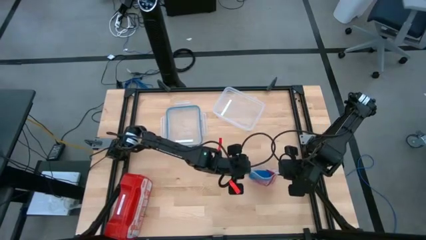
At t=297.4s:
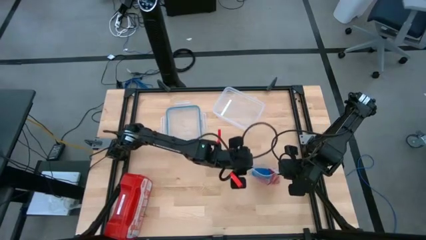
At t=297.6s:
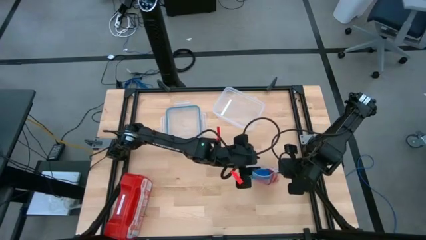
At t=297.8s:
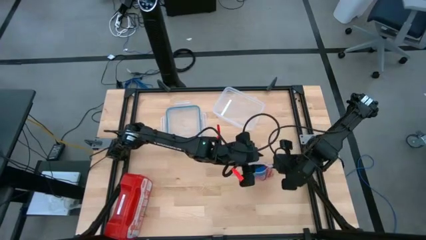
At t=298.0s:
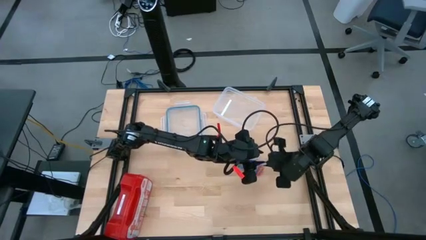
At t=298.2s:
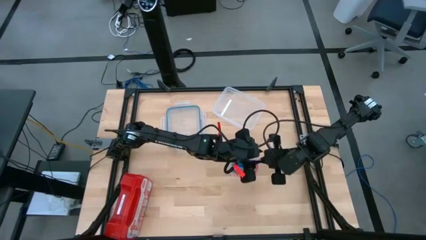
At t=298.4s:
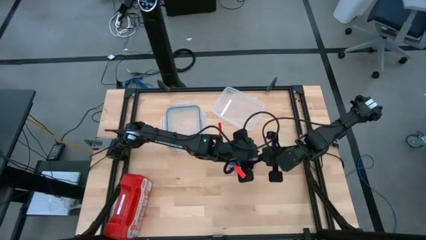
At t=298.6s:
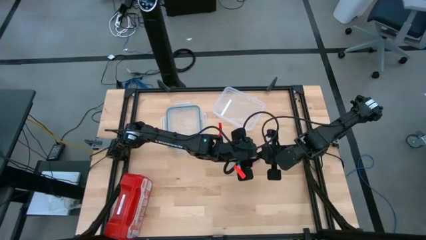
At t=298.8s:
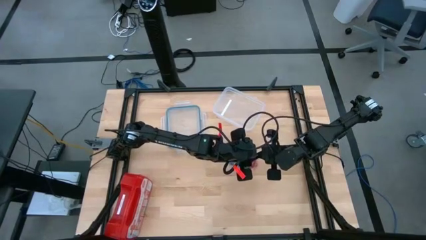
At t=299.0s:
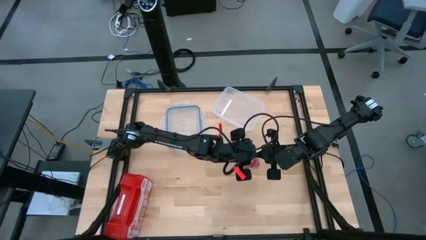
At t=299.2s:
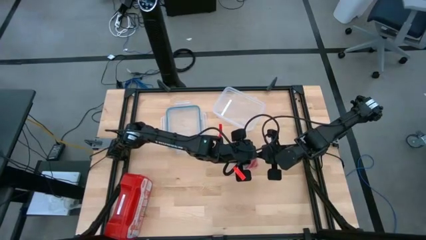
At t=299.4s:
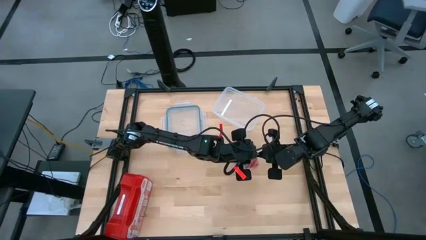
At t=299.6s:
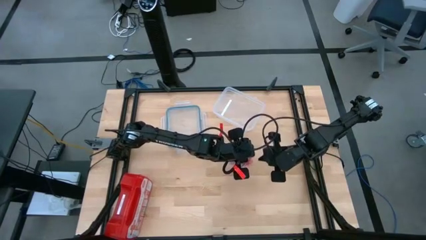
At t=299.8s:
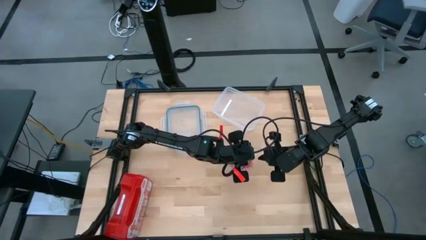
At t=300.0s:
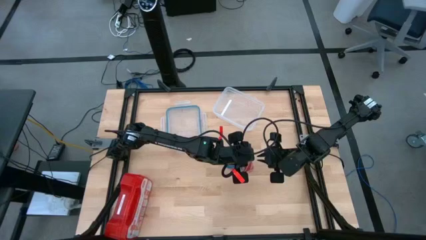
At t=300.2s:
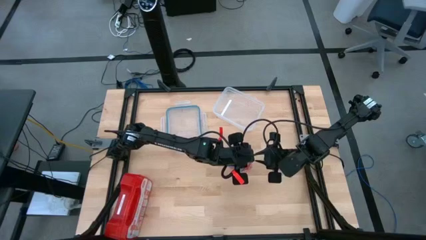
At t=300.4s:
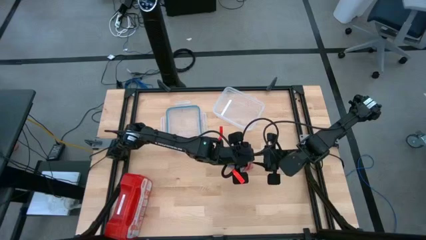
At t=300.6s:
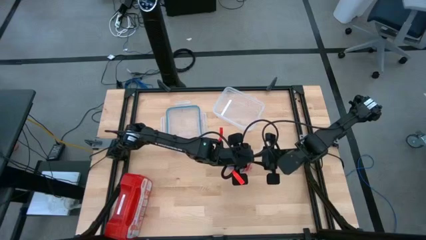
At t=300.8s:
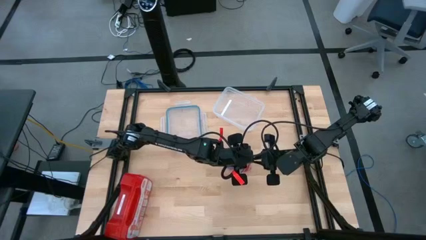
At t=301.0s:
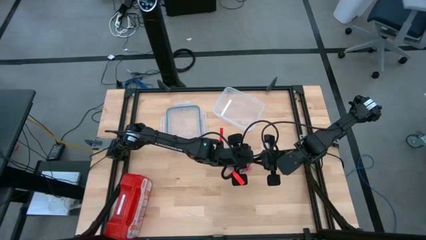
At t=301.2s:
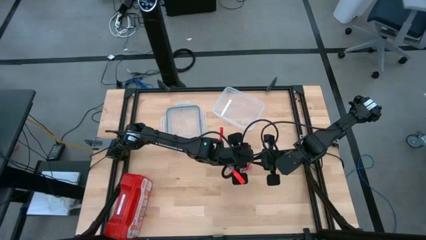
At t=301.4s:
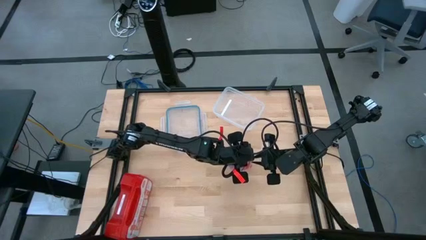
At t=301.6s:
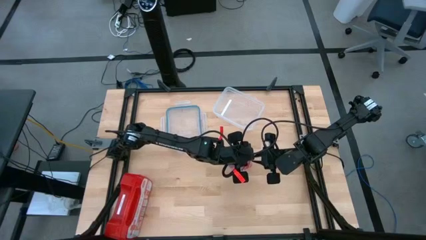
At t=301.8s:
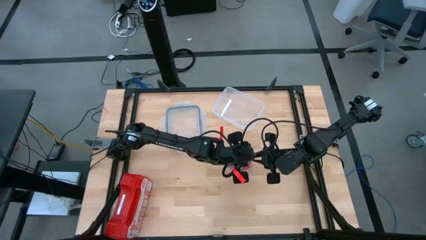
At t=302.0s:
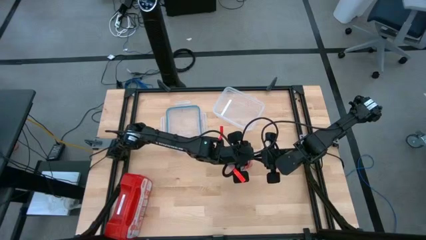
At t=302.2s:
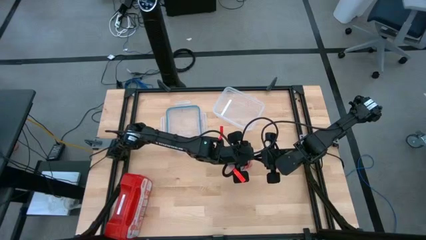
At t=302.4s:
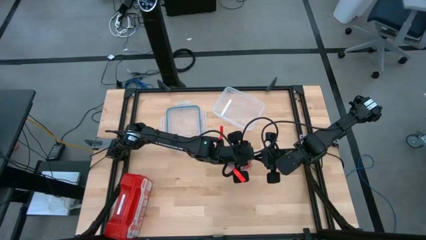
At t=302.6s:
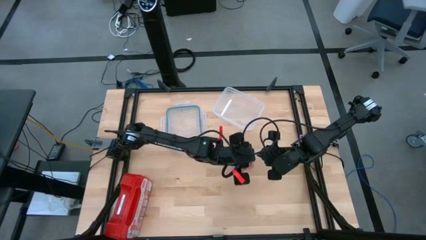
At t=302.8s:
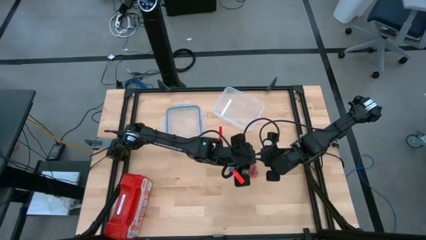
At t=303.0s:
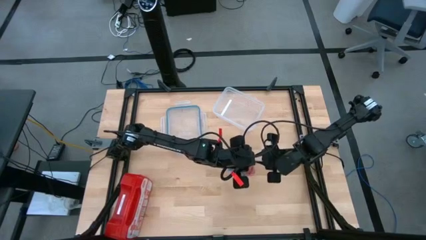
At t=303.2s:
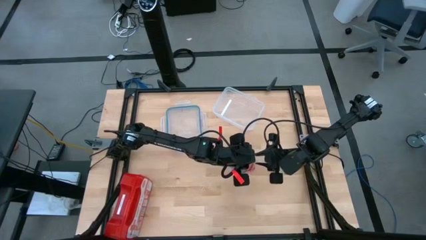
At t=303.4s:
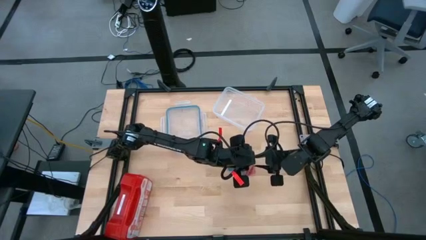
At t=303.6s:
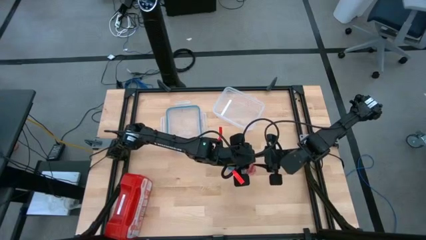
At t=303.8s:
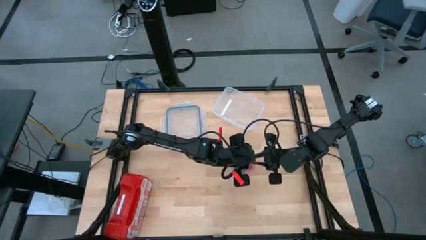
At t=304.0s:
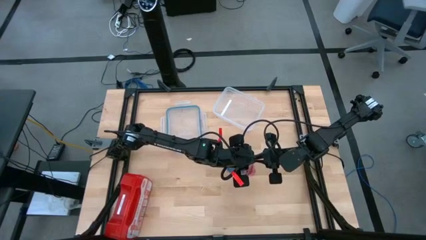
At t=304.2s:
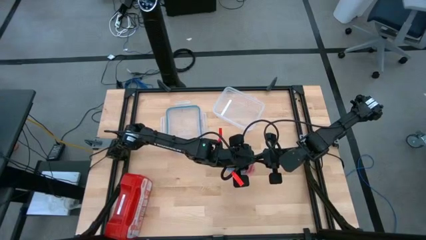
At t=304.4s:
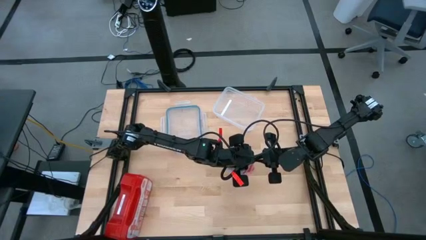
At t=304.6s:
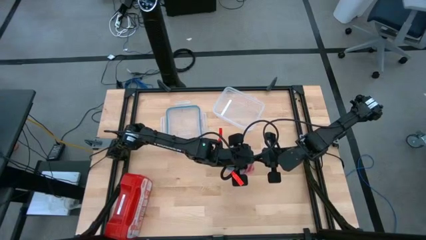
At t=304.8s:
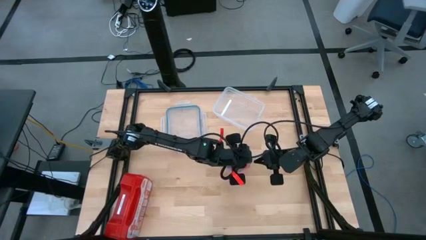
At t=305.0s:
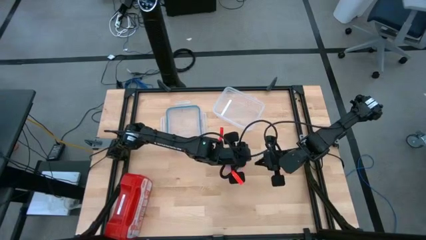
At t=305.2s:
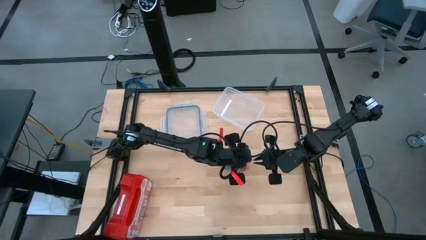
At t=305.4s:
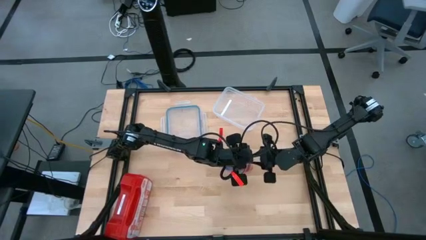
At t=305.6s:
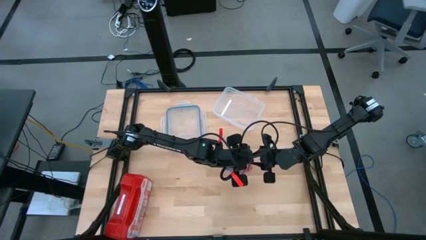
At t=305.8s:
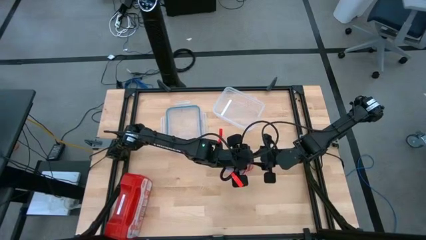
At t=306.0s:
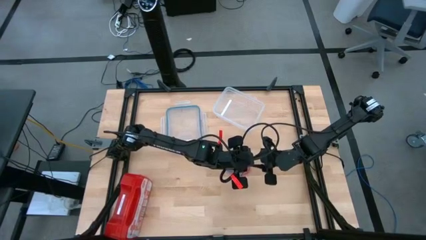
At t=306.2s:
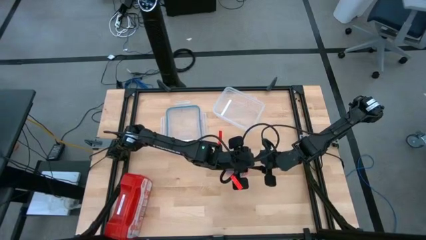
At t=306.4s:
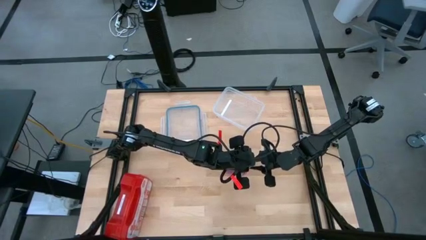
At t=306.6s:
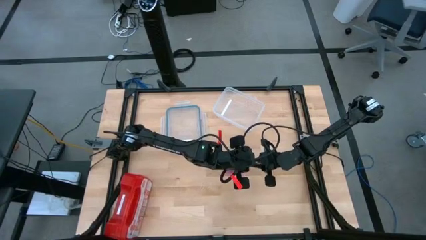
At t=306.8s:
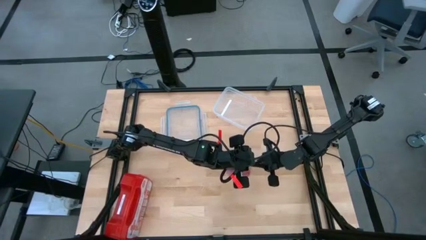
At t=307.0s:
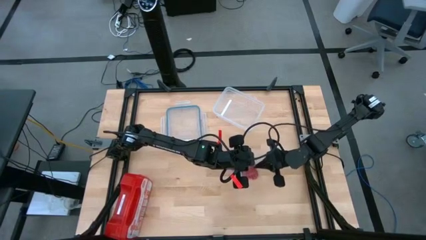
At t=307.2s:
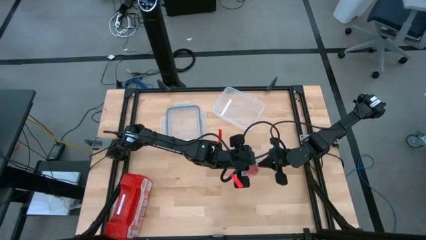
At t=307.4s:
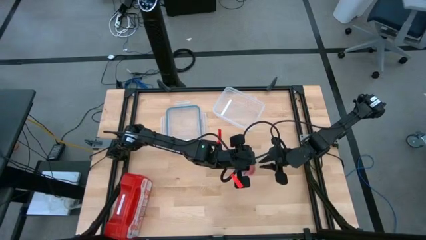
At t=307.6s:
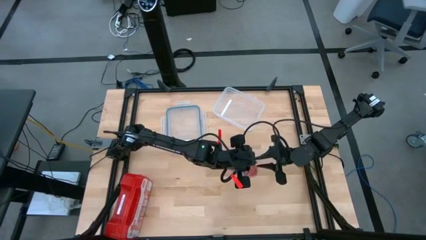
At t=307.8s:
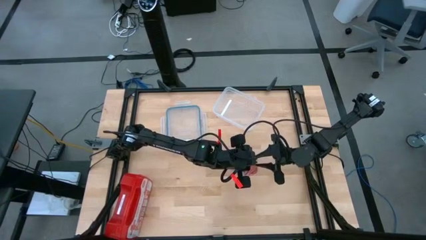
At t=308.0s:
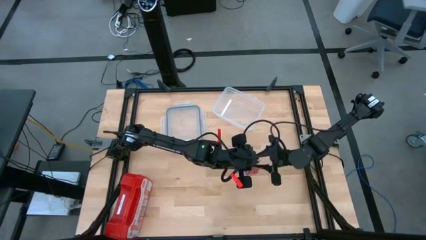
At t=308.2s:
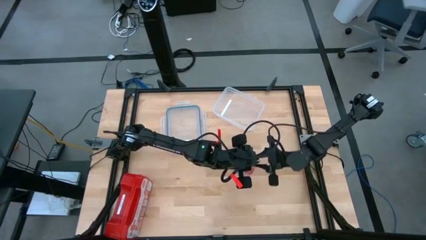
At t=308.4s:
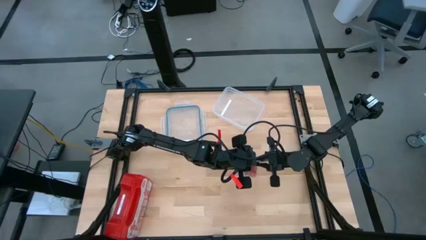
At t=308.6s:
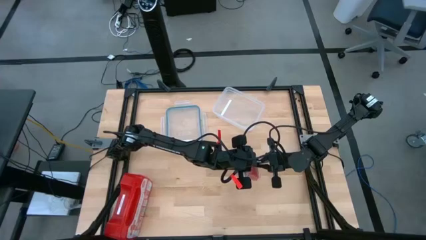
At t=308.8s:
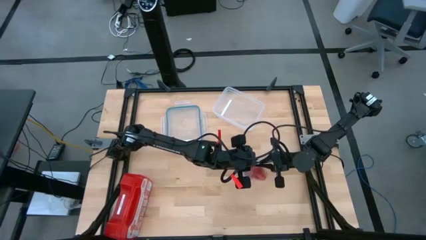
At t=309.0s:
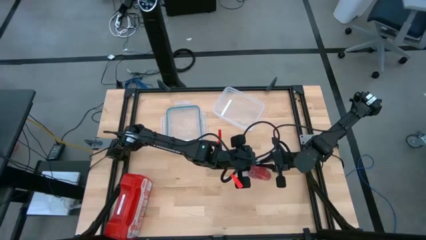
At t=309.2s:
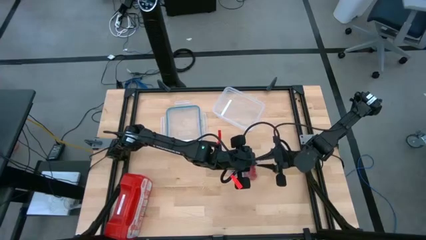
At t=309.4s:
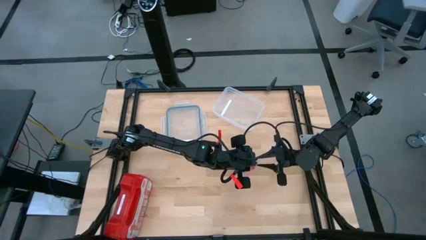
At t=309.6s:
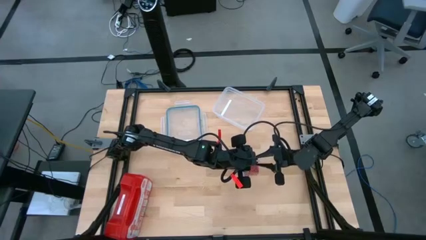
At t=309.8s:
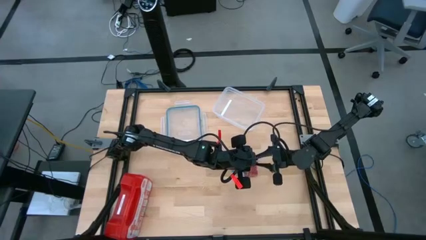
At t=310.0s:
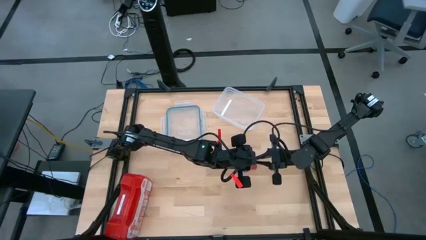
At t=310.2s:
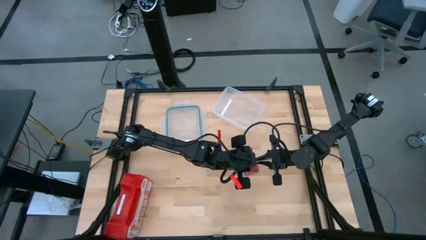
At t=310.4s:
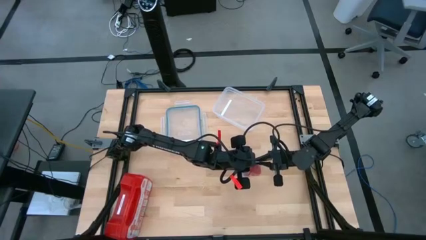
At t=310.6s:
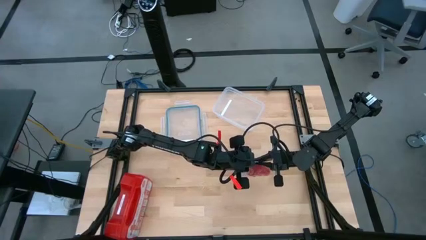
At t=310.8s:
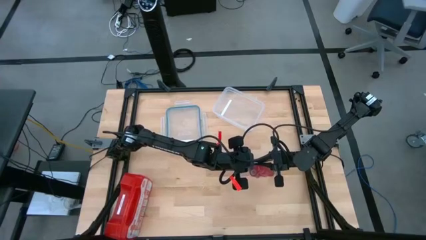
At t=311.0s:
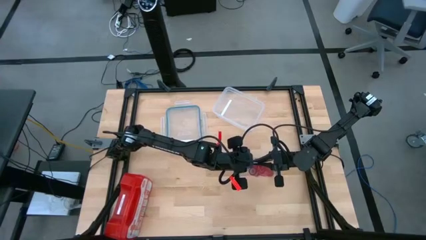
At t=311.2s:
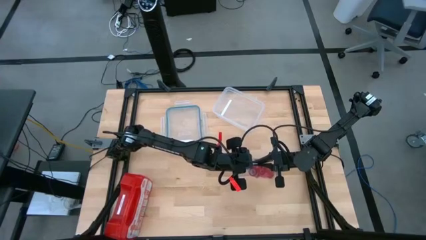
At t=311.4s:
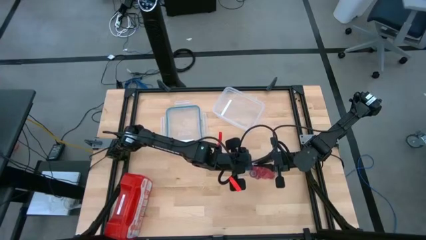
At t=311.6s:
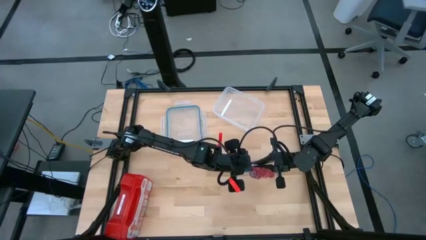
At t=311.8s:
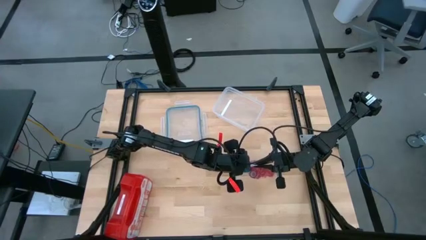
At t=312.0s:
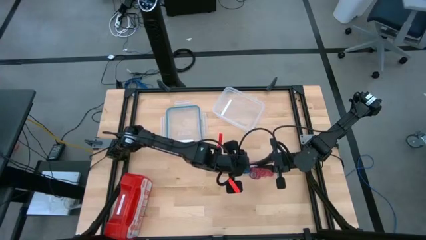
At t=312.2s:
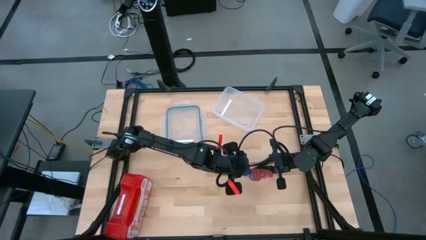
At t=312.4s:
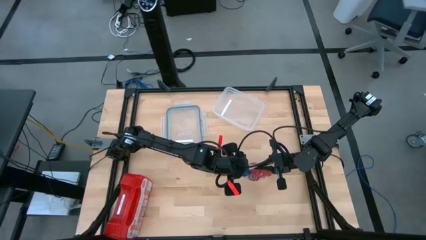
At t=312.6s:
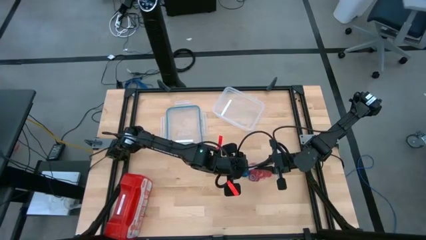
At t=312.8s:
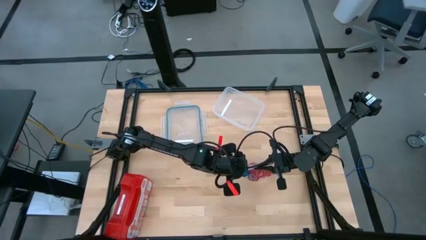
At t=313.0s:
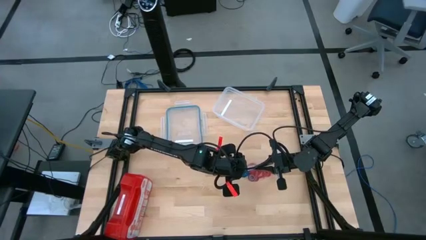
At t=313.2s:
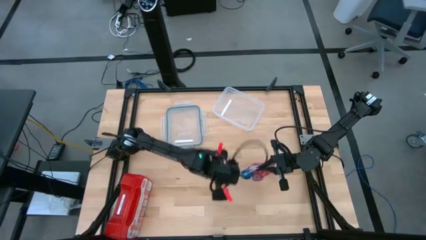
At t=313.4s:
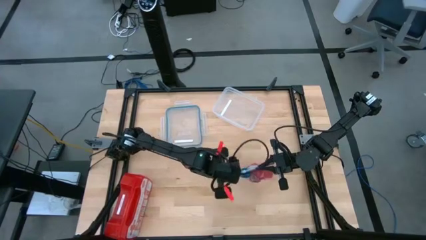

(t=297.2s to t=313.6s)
Task: Roll bandage
Close the transparent zip bag
